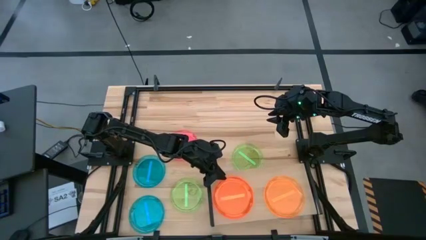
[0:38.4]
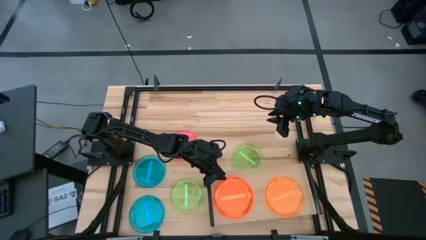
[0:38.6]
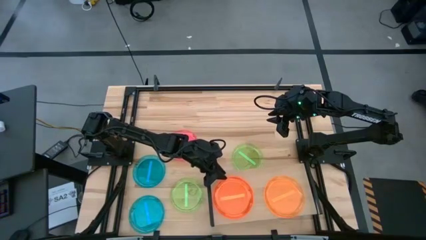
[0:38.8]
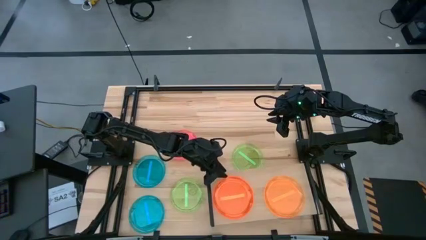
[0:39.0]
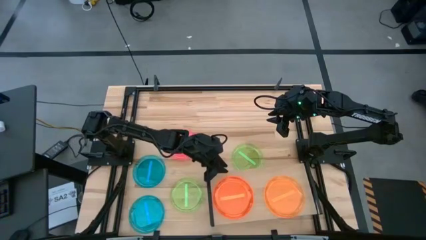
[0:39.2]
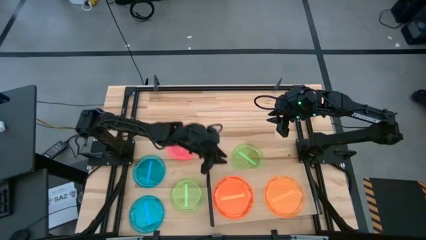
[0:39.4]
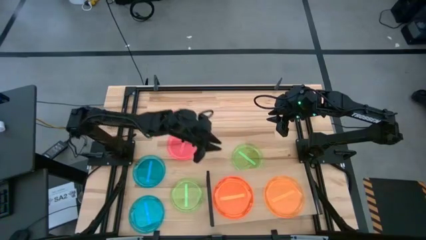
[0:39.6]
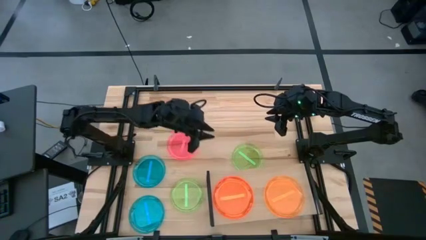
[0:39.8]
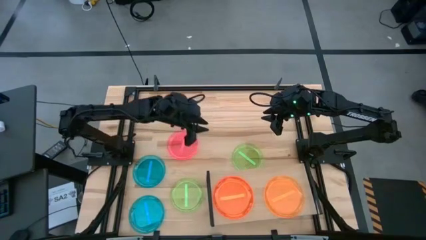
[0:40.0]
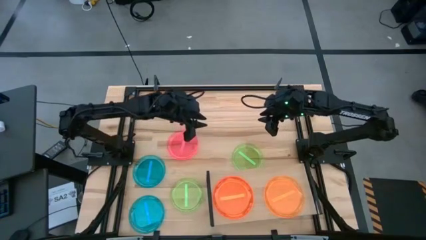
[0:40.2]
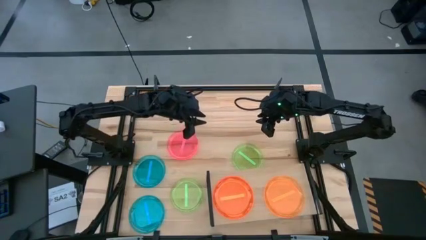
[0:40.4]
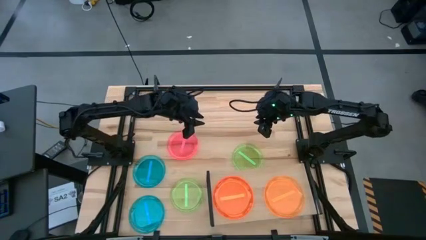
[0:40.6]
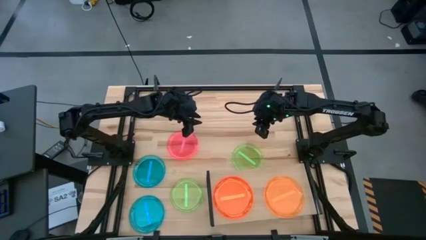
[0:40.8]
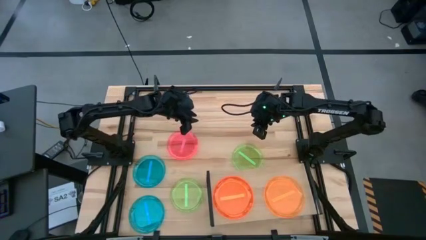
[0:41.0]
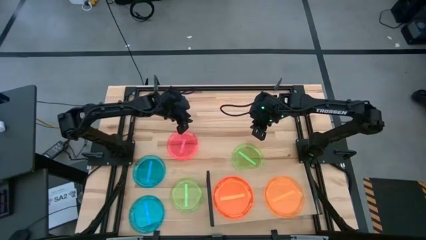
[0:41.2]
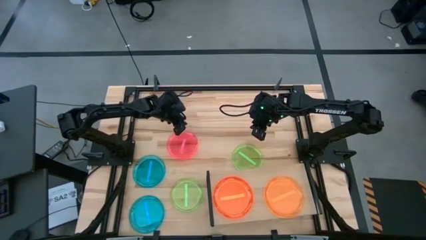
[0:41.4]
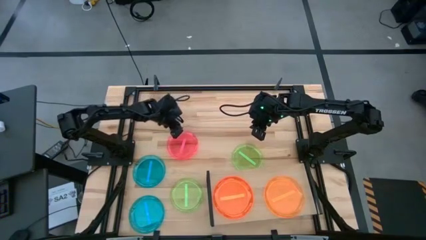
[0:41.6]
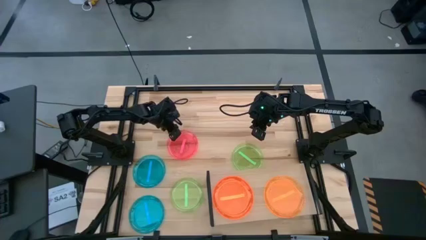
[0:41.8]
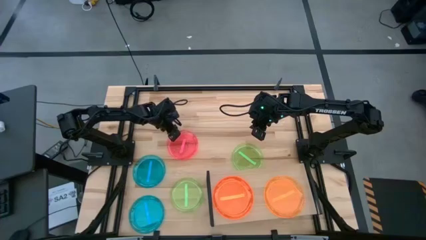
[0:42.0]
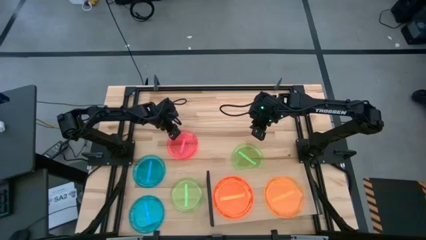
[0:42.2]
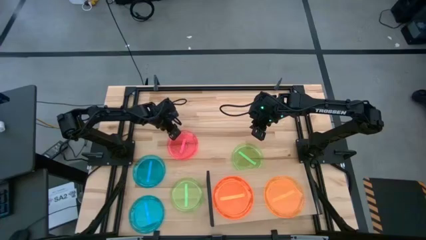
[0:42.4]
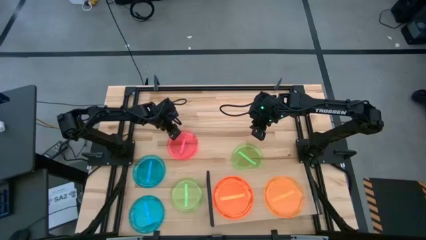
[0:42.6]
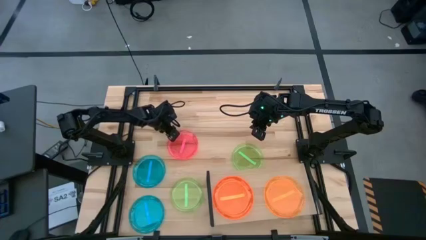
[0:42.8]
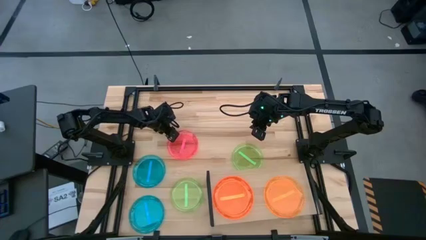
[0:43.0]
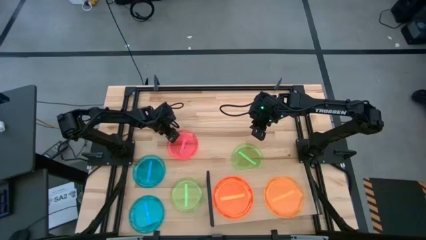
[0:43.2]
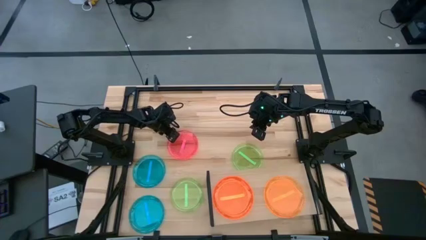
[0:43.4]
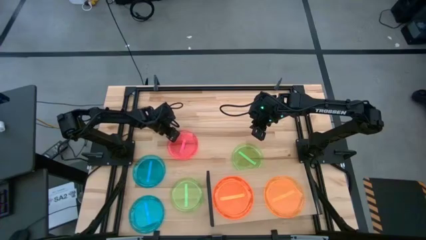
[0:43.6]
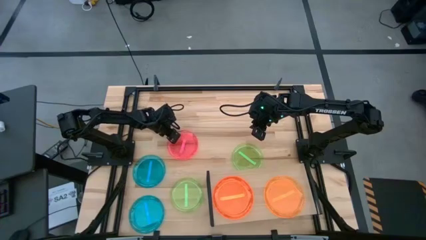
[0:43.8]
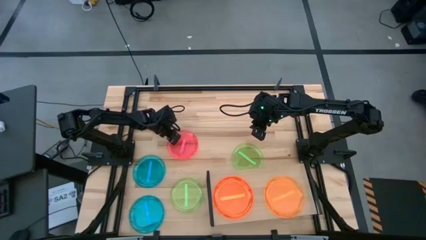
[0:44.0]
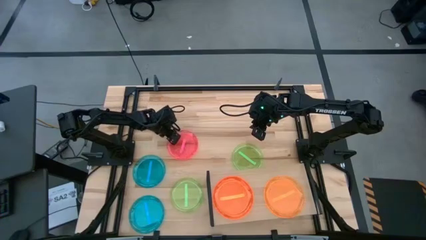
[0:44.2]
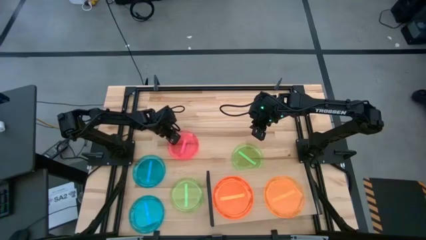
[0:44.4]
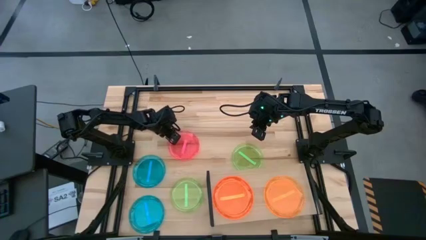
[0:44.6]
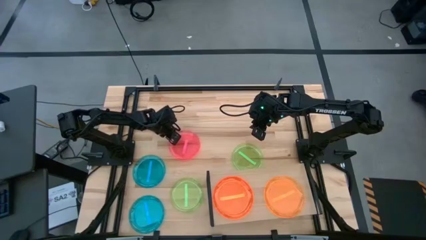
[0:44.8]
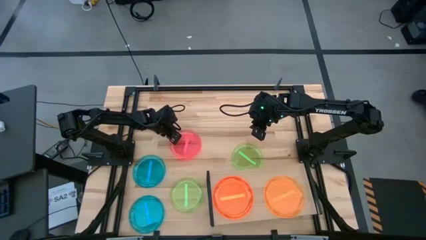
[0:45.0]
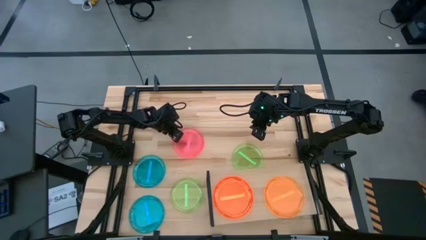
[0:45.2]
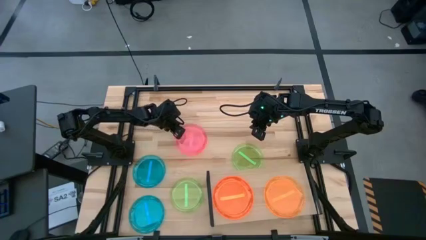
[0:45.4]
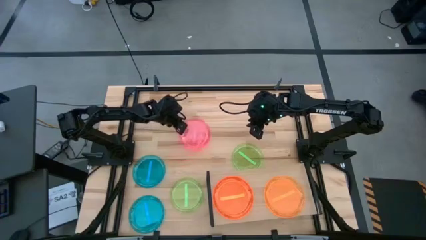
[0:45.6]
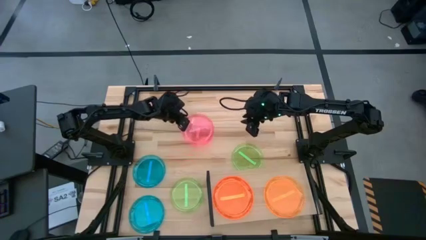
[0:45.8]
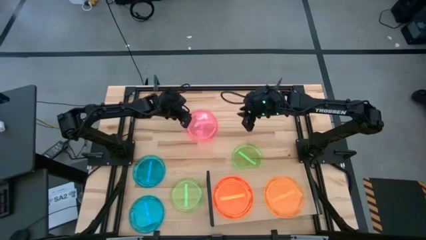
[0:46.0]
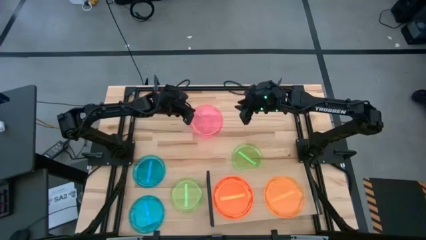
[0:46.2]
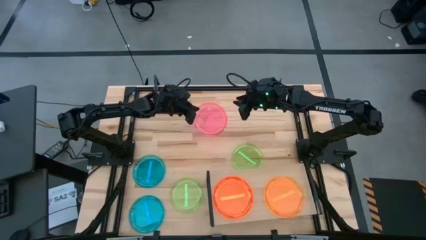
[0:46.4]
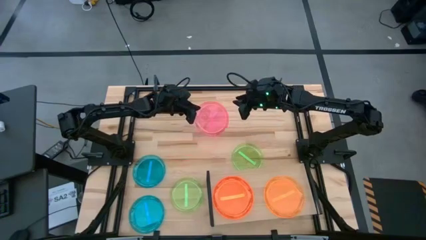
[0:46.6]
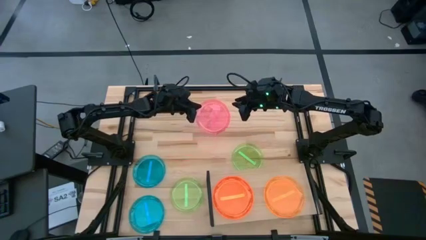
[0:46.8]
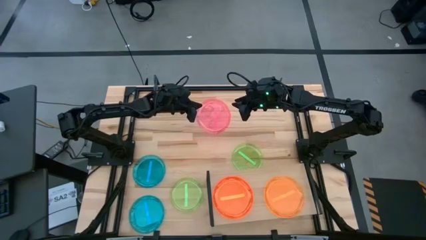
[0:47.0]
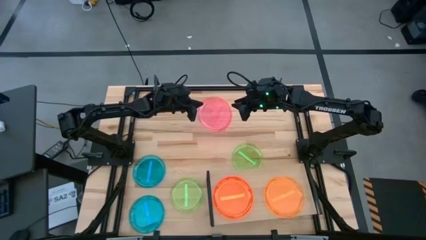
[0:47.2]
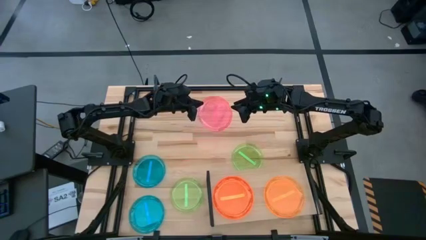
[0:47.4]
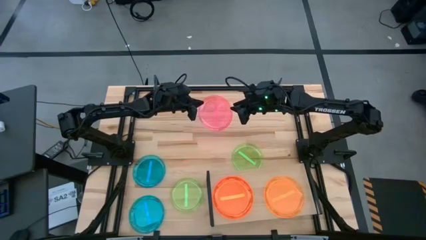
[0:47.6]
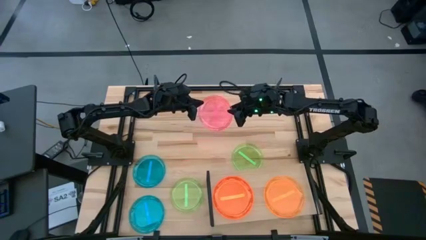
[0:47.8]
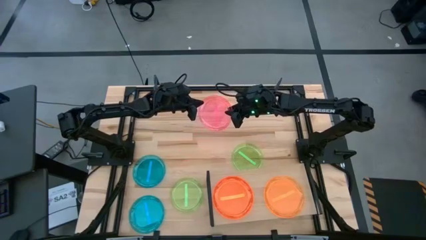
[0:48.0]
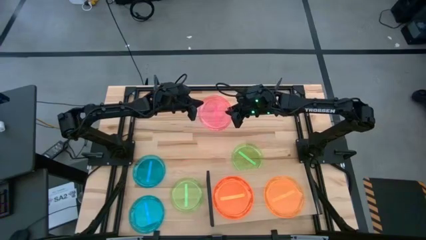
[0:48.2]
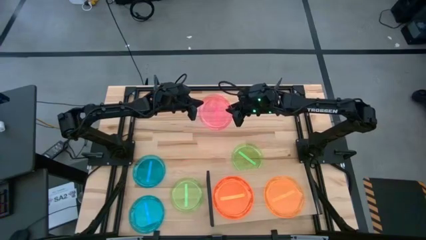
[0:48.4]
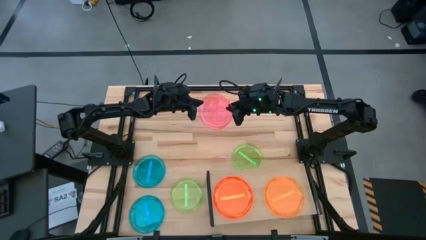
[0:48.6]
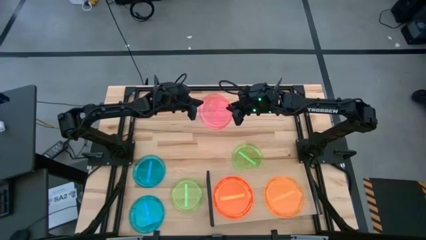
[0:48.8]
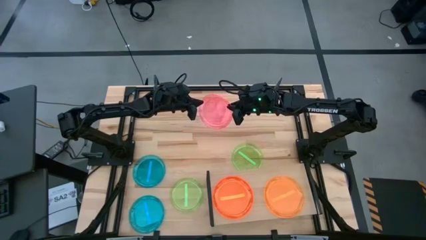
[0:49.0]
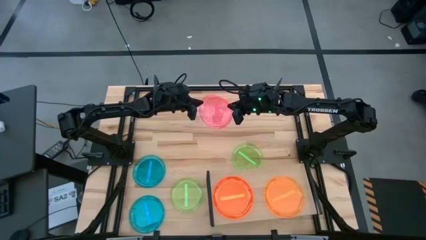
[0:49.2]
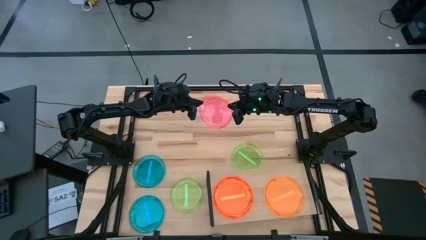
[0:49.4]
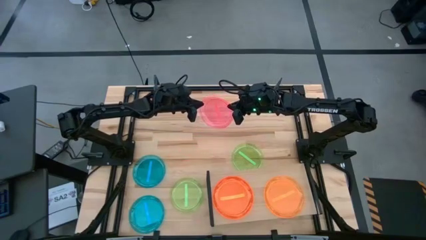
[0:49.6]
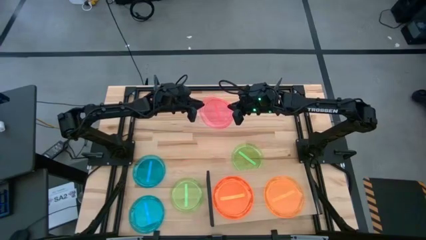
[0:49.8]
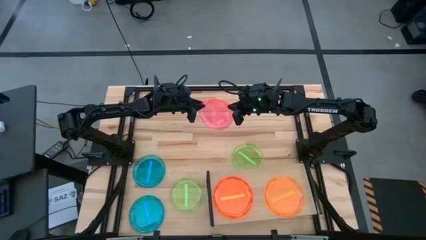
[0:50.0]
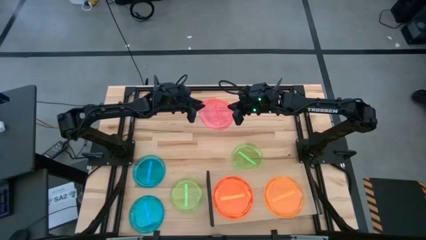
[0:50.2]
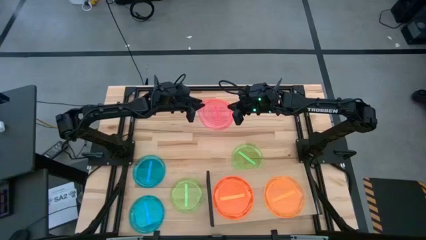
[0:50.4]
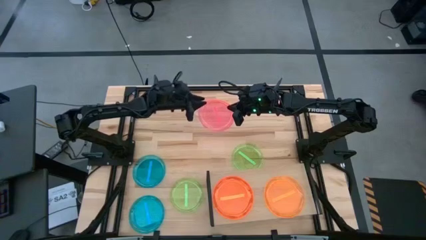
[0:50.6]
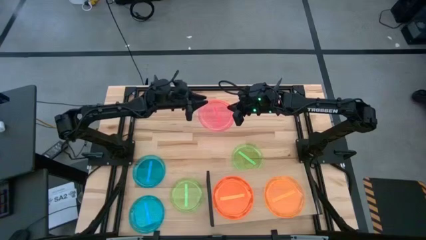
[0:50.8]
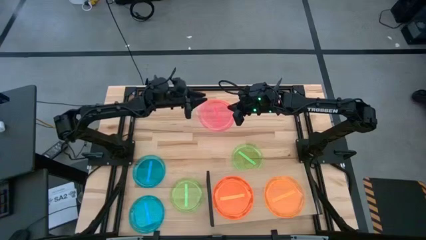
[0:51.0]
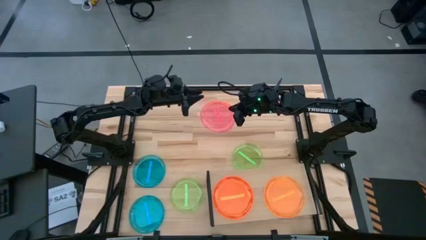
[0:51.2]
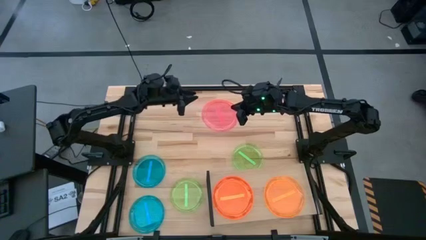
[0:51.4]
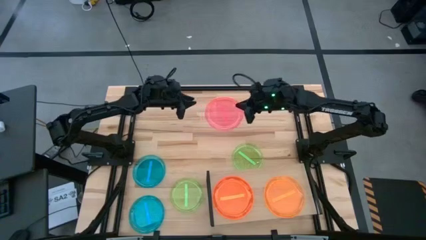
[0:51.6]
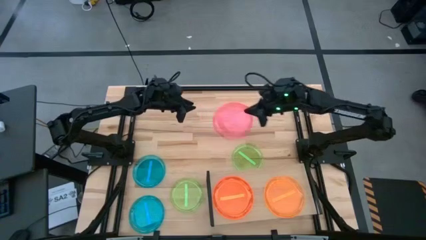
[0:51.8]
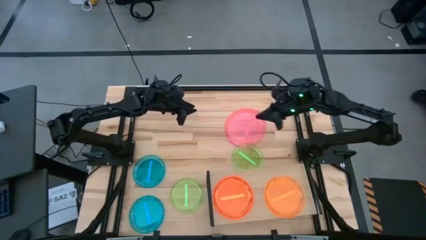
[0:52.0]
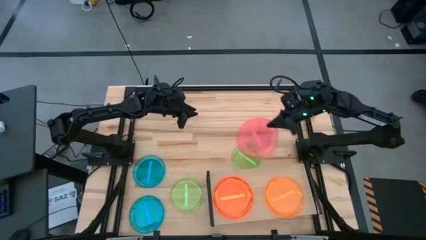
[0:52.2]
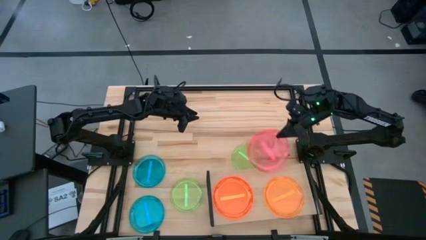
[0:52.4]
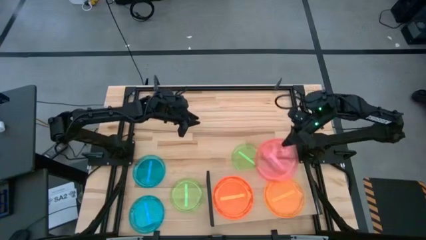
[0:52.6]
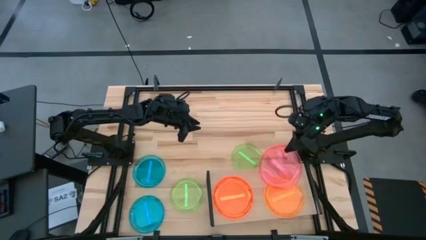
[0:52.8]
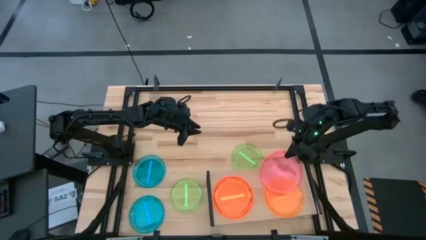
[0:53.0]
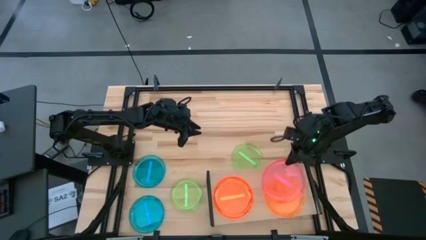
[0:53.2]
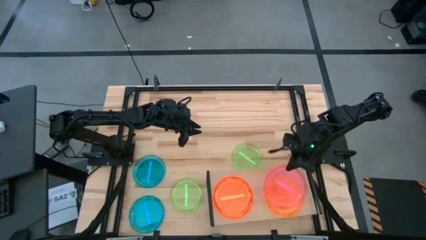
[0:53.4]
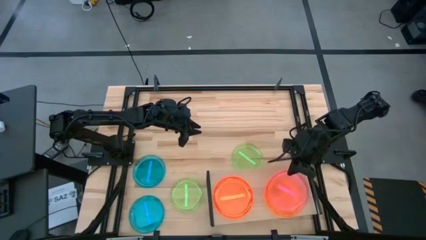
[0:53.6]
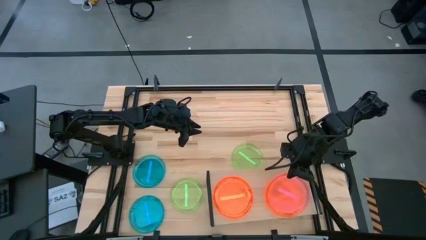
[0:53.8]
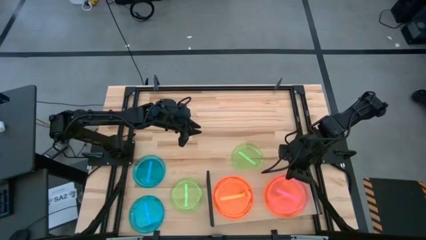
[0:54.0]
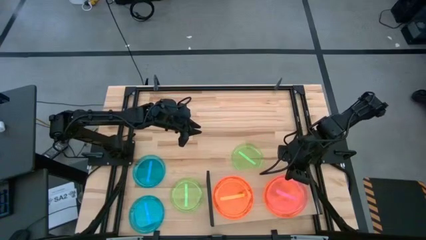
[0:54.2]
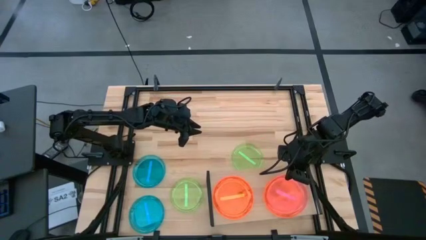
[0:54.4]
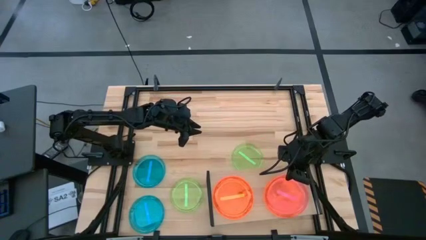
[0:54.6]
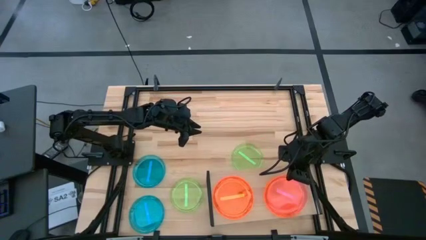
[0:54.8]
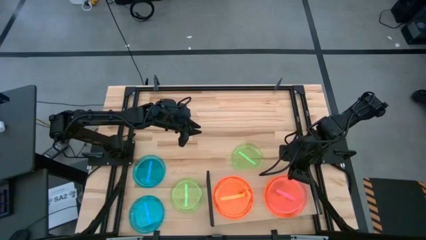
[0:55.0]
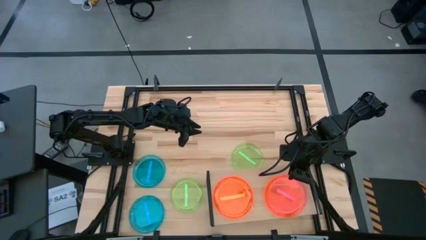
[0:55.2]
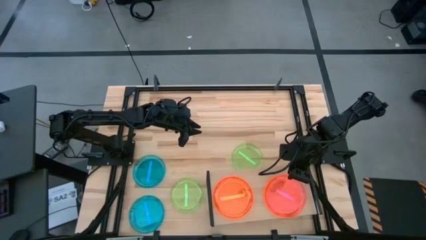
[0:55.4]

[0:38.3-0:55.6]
Task: Place and stack plates onto a shelf
Stack the pink plate on the orange plate on the shelf
